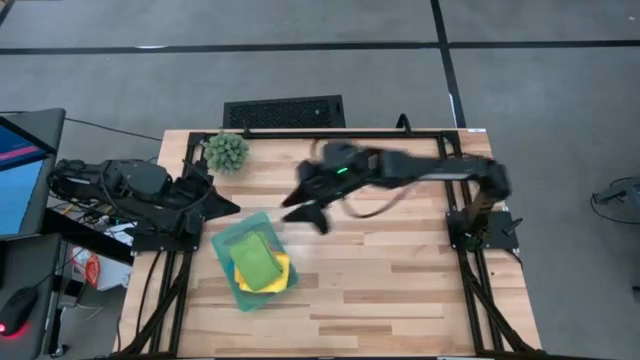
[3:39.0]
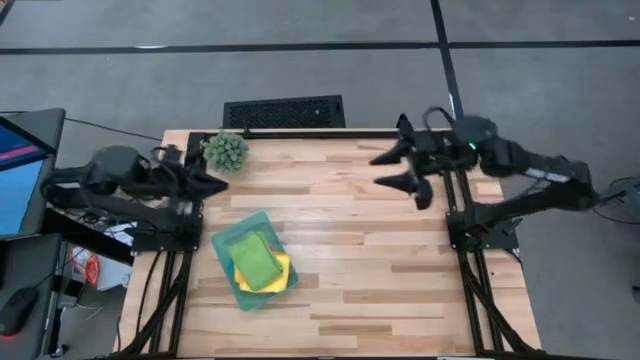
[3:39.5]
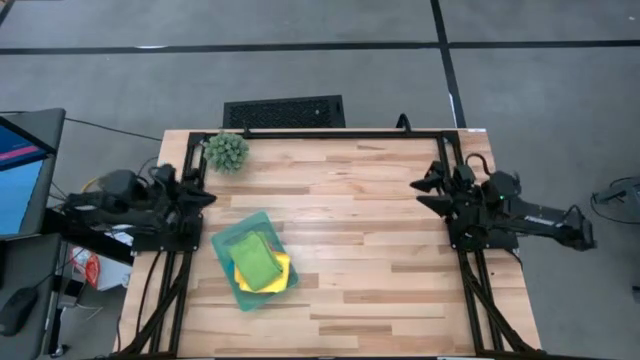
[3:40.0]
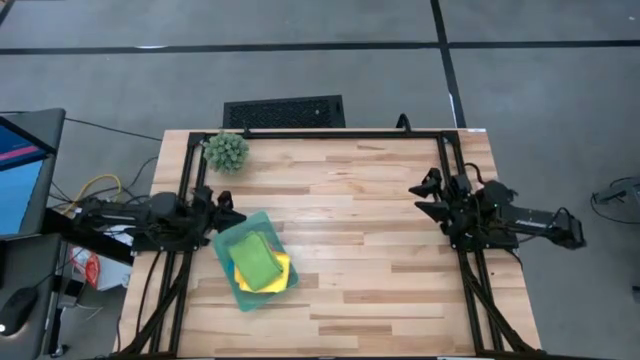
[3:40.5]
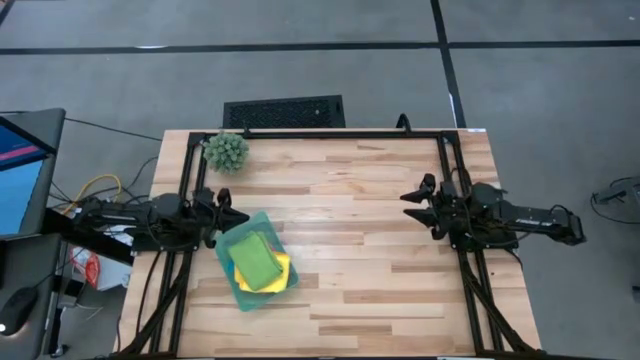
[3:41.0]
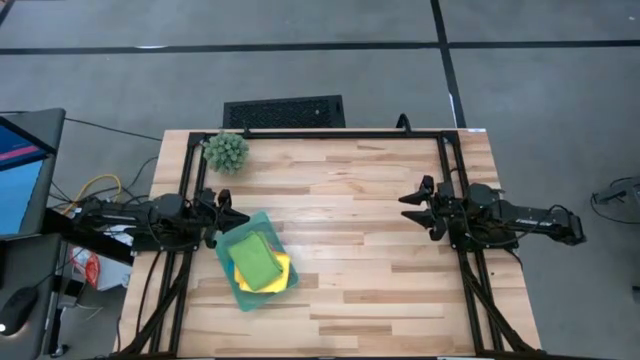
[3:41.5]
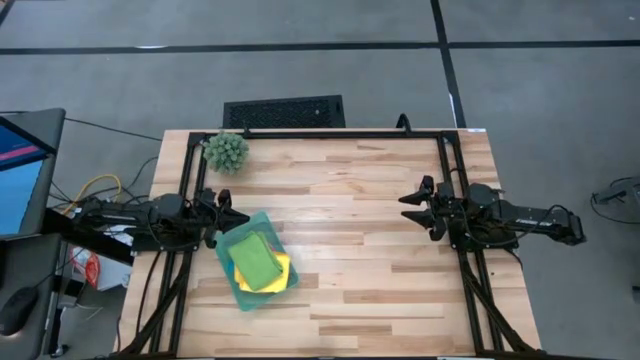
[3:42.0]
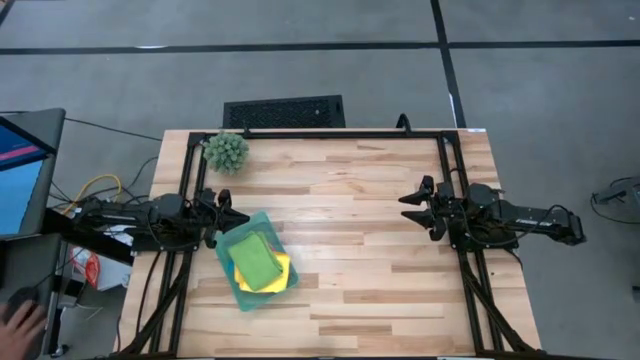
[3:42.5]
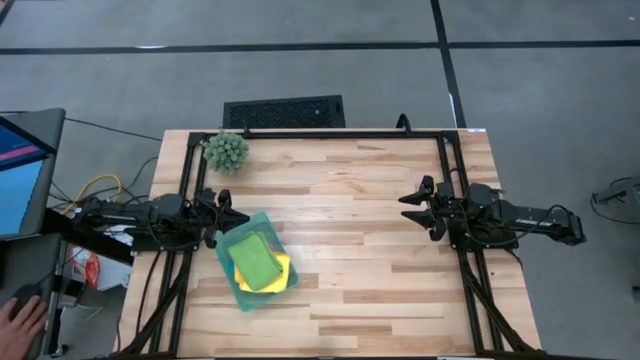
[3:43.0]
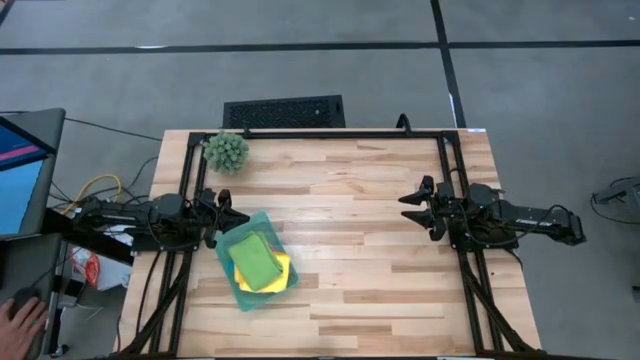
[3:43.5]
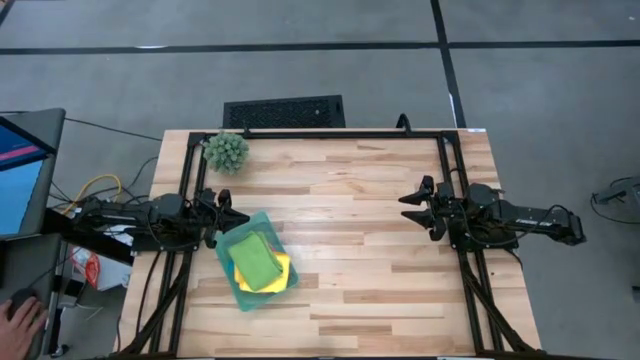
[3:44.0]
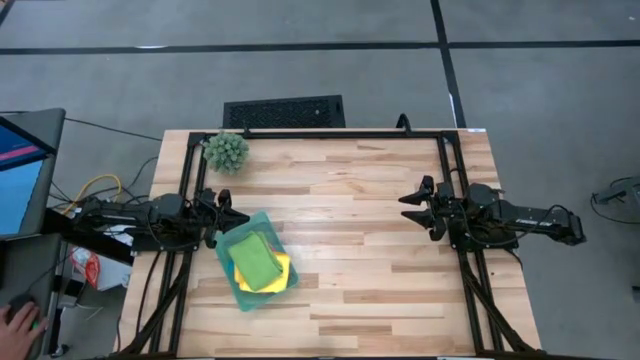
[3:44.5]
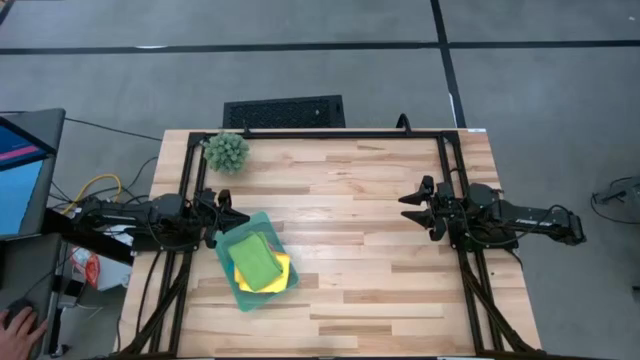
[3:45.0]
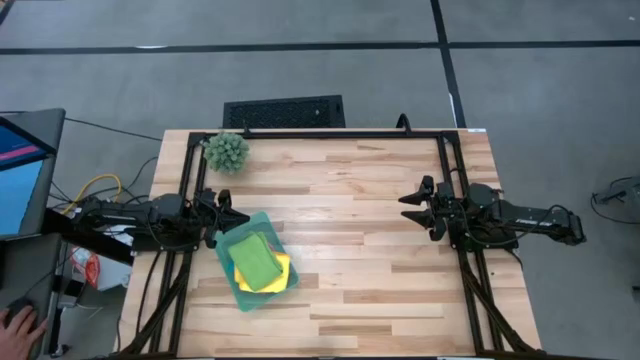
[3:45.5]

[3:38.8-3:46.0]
Task: Fold microfiber towels
Return to Home Position

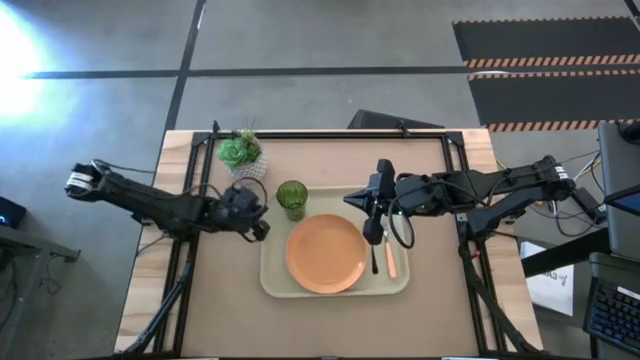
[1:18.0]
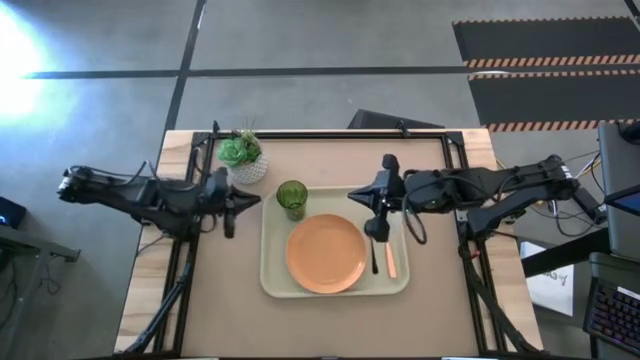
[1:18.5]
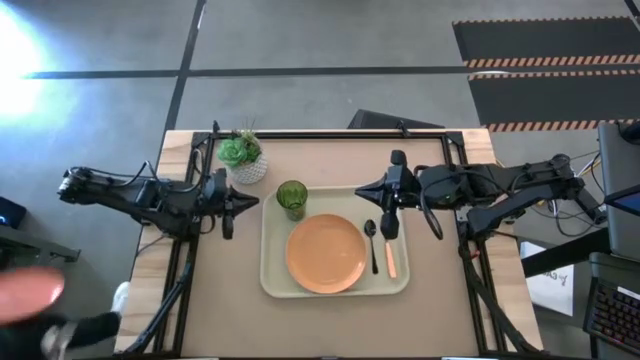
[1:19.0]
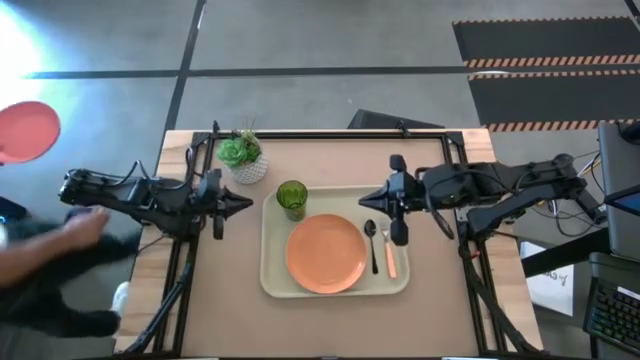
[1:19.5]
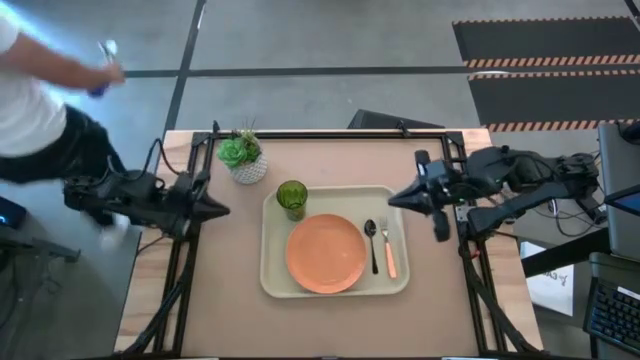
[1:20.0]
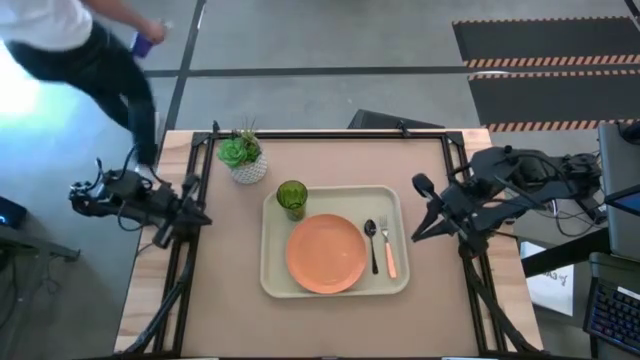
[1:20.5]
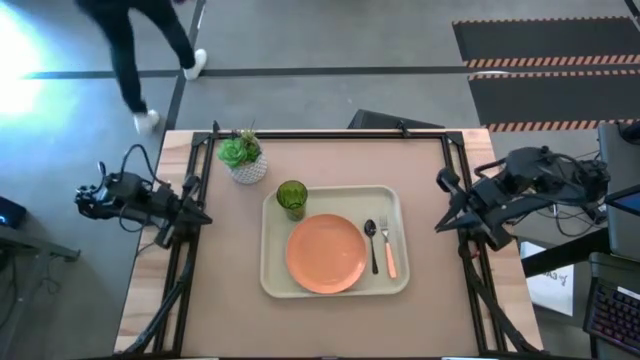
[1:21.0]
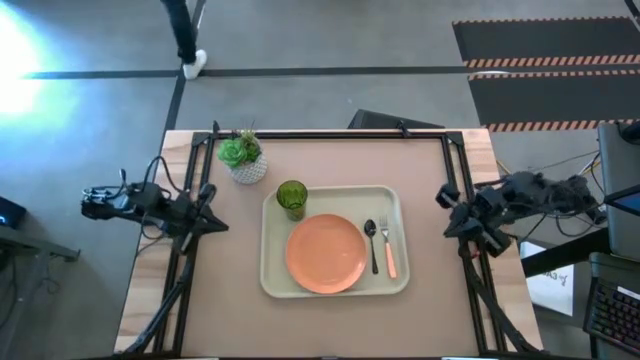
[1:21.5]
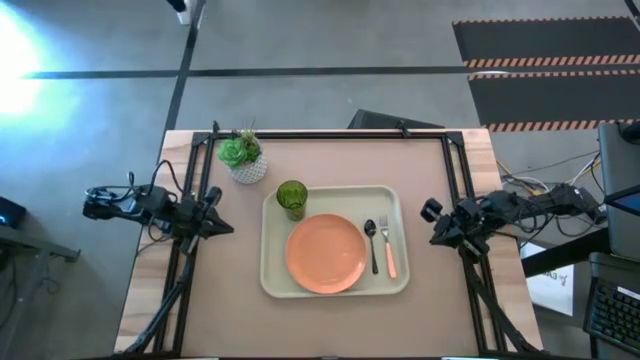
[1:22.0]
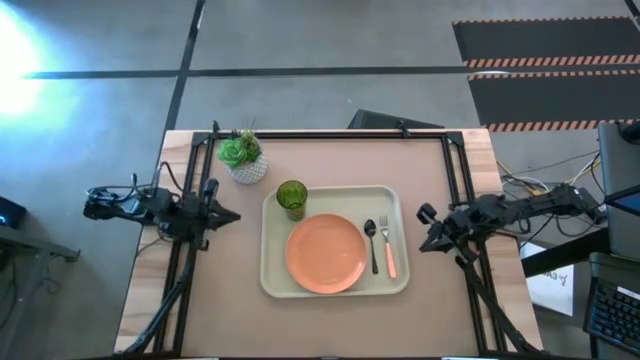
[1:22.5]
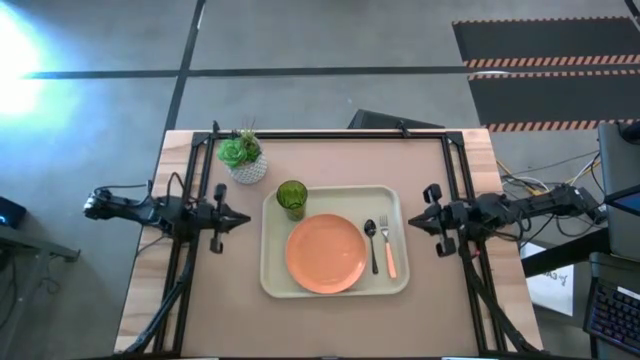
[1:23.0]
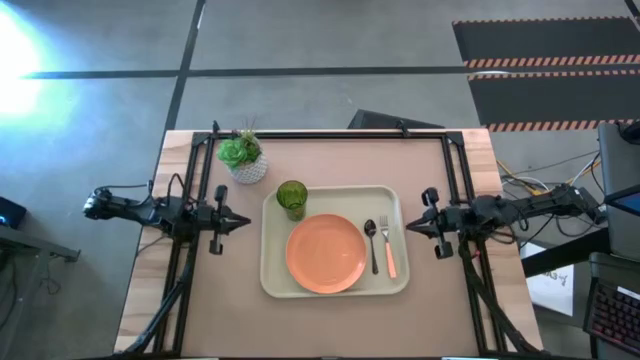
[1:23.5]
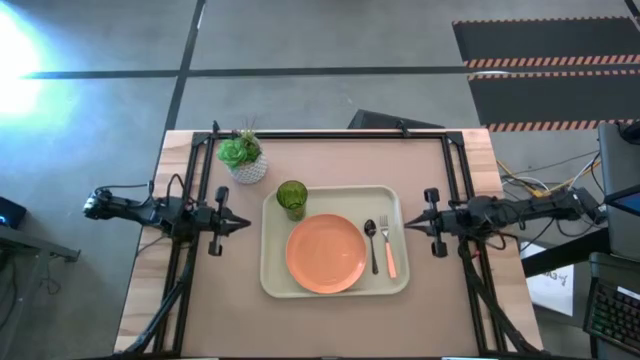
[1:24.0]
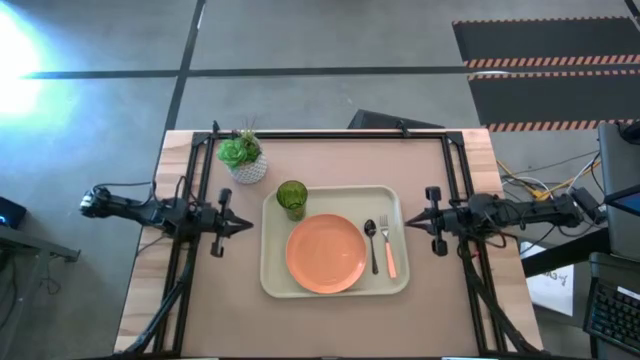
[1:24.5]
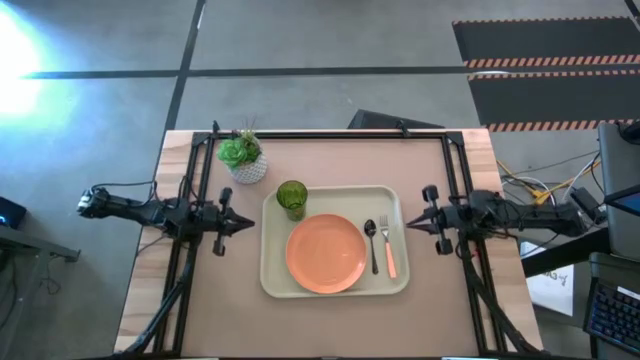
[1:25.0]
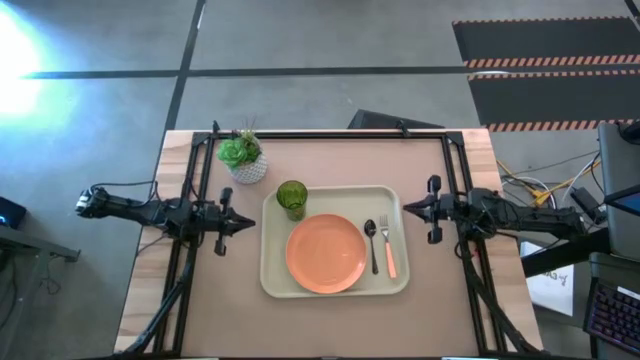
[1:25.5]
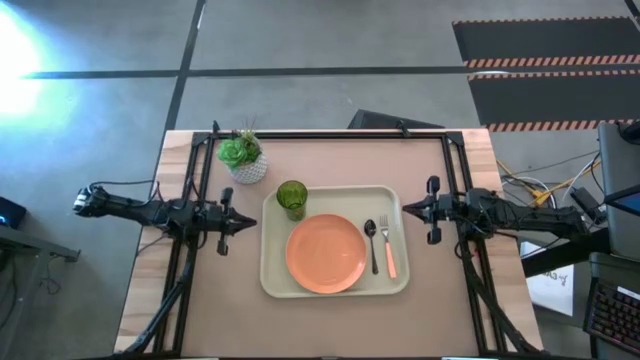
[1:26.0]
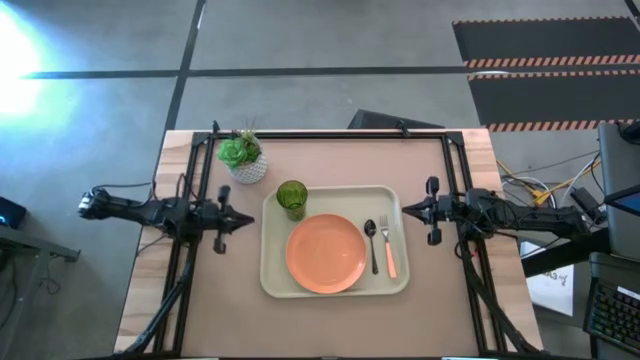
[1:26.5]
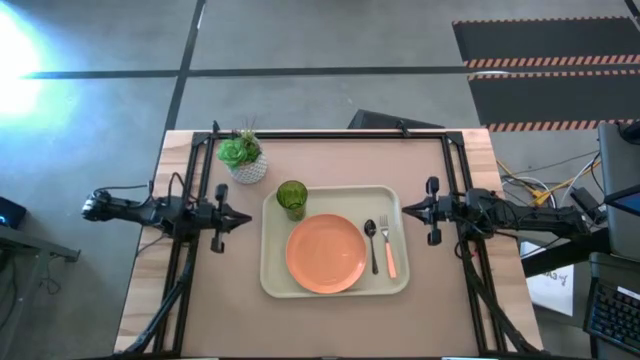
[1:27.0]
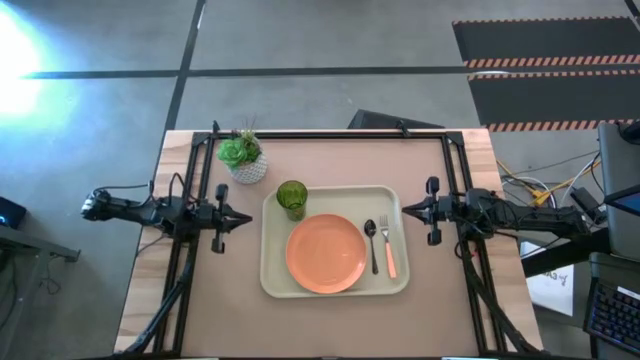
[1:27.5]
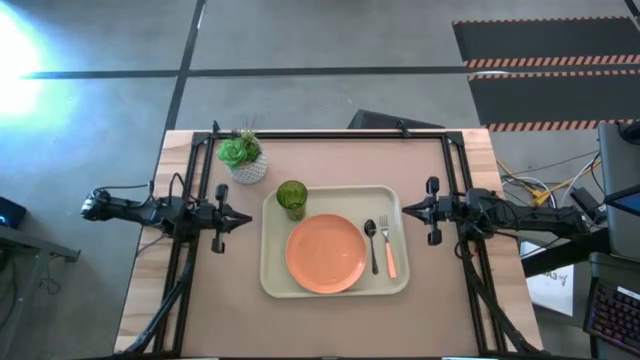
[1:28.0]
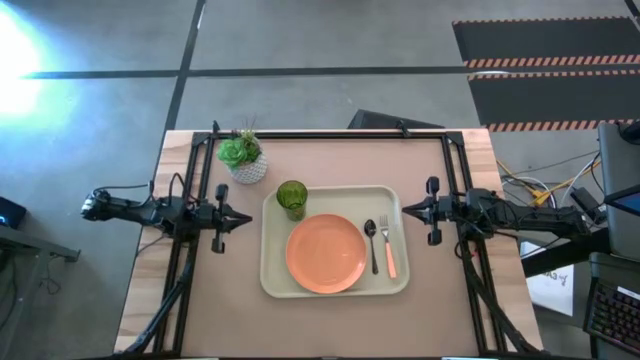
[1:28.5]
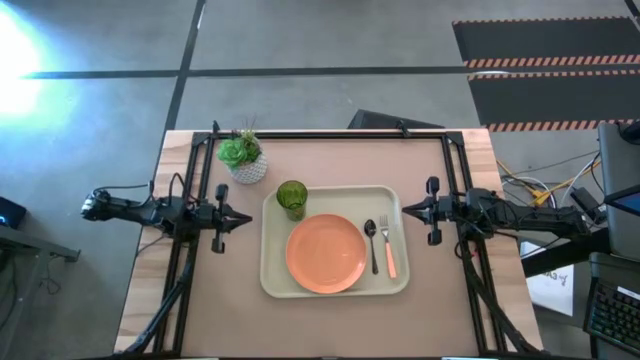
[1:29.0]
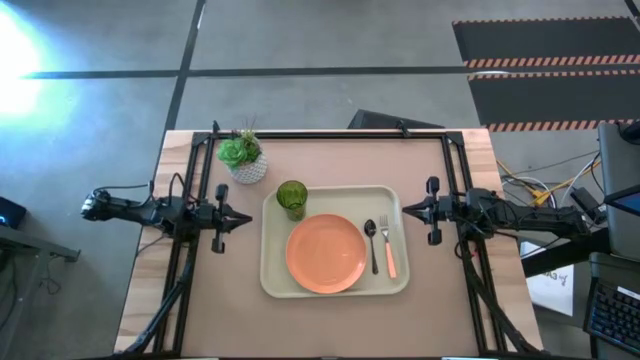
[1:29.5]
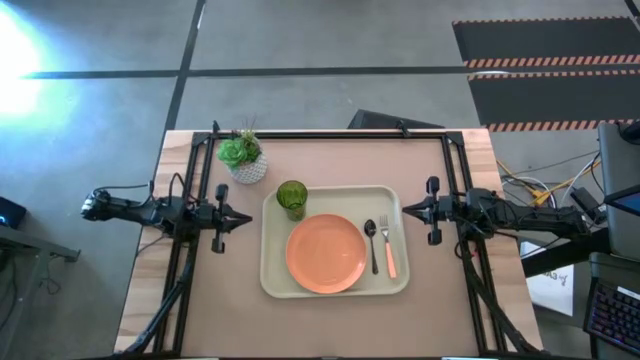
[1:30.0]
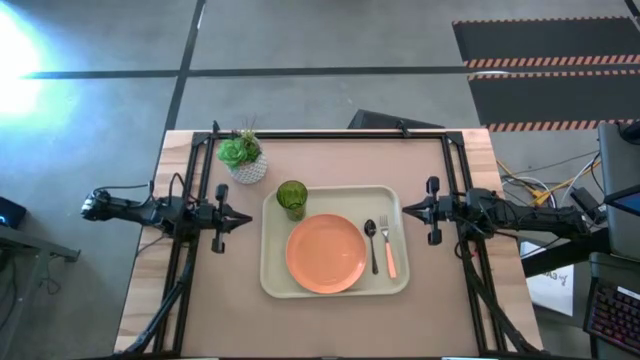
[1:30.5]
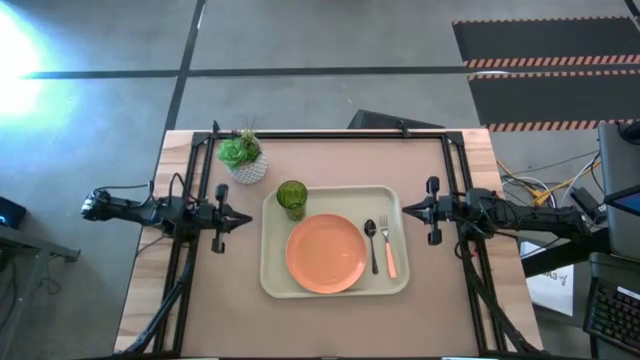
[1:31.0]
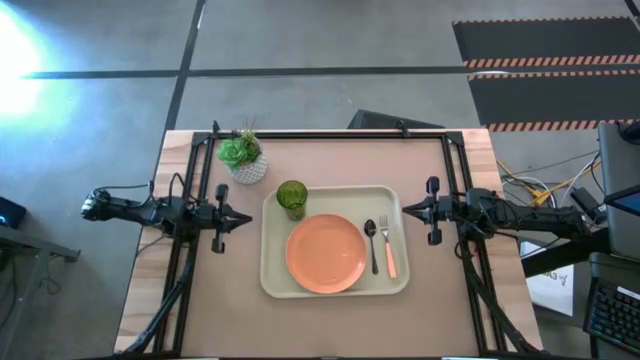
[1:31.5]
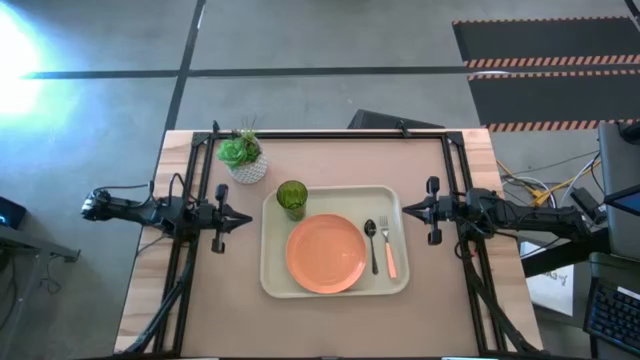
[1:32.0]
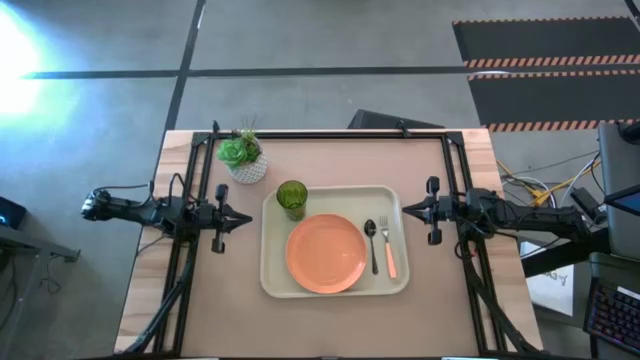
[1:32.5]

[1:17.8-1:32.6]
Task: Pick and place plate/cup/fork/spoon on tray
Return to Home Position
